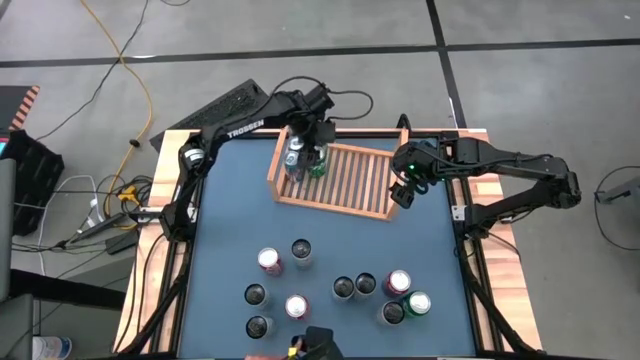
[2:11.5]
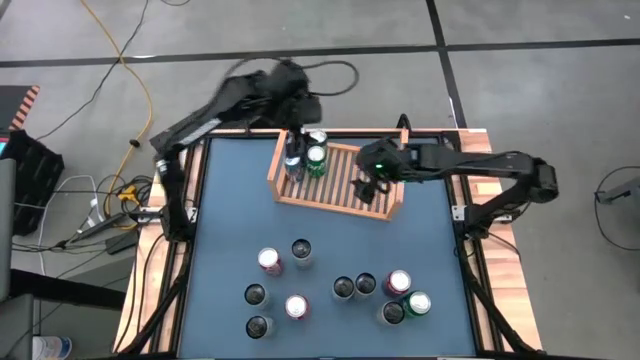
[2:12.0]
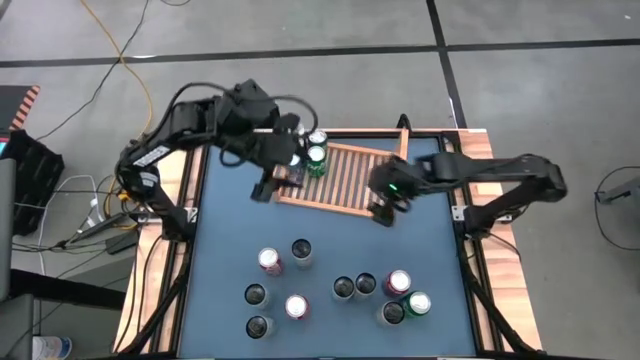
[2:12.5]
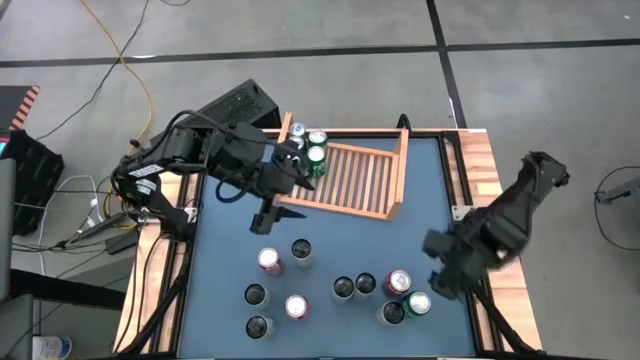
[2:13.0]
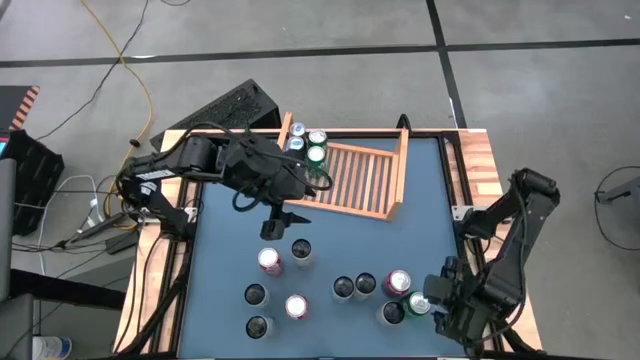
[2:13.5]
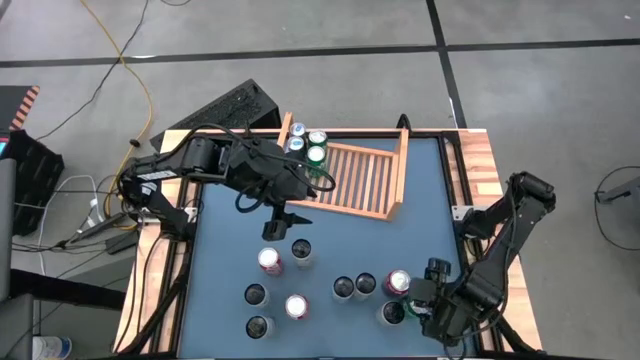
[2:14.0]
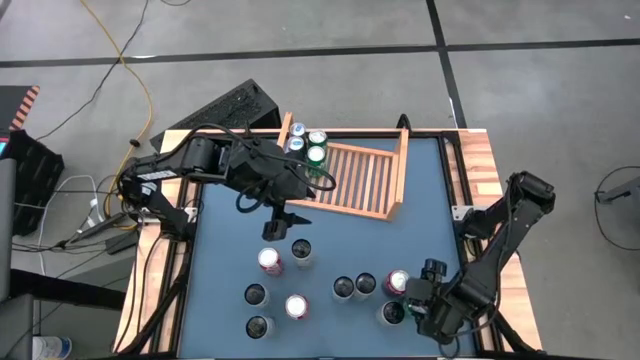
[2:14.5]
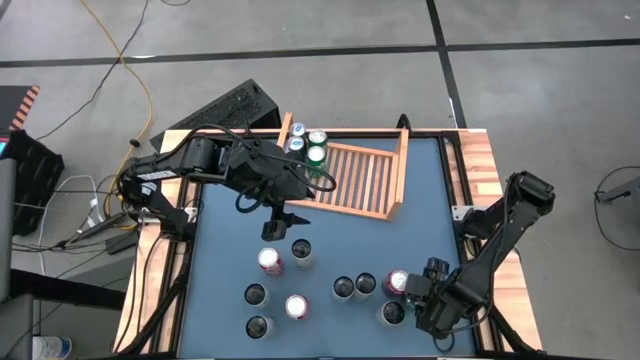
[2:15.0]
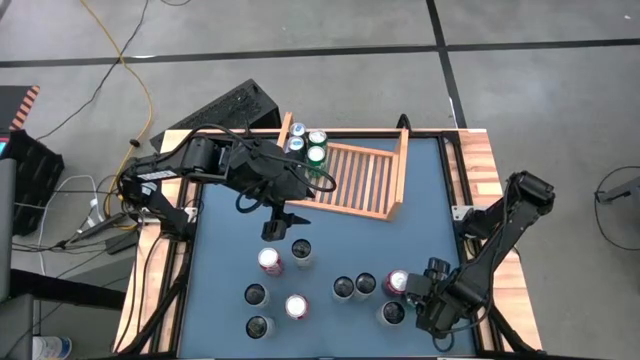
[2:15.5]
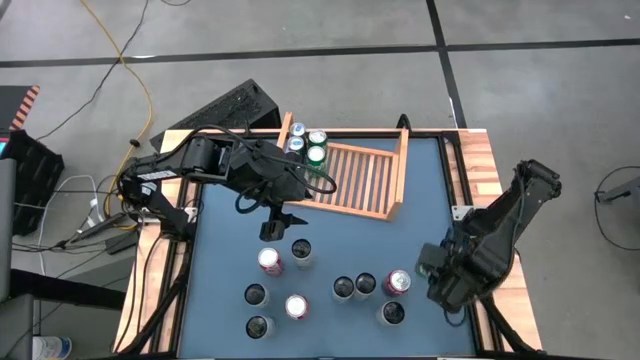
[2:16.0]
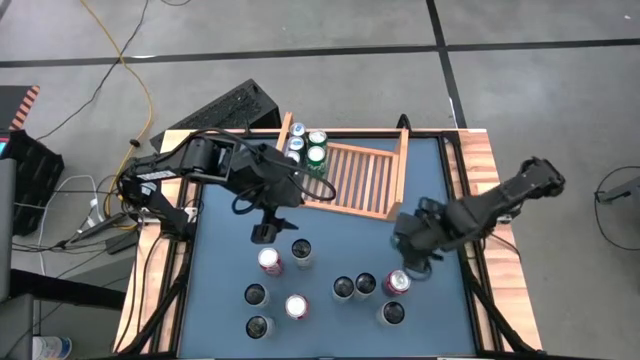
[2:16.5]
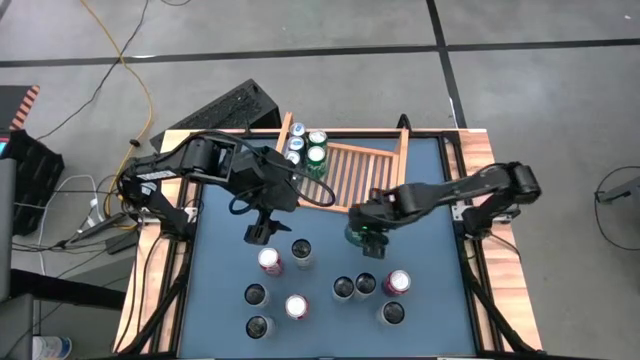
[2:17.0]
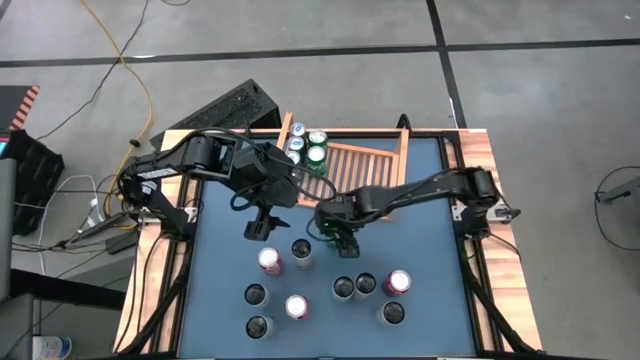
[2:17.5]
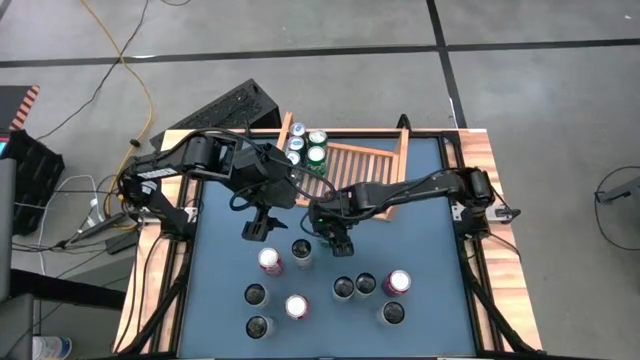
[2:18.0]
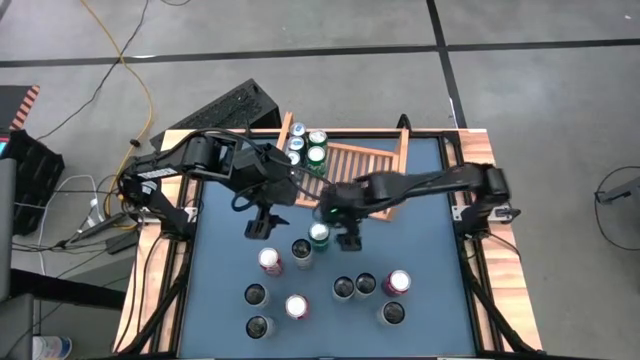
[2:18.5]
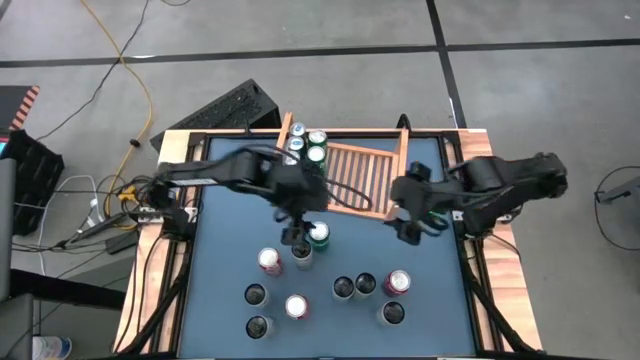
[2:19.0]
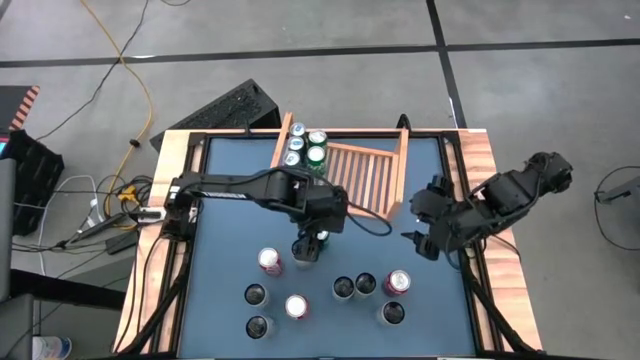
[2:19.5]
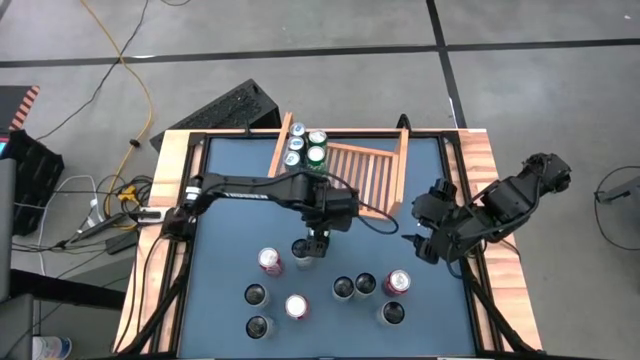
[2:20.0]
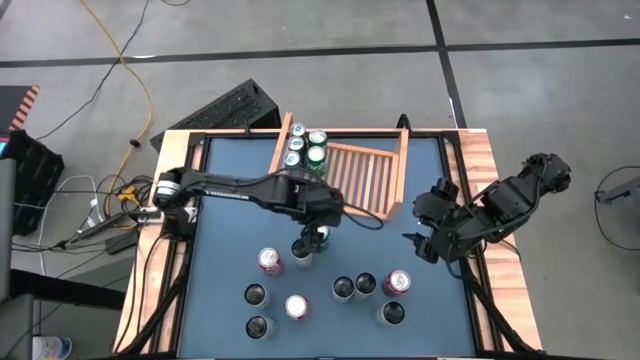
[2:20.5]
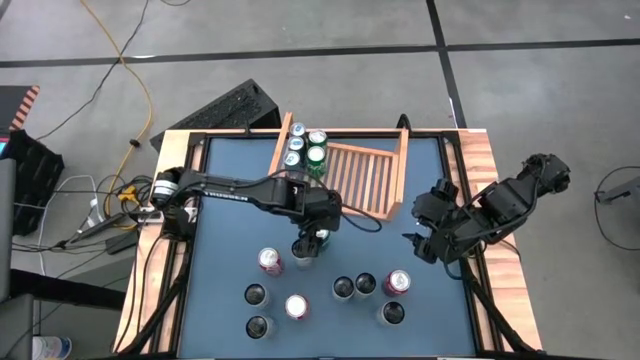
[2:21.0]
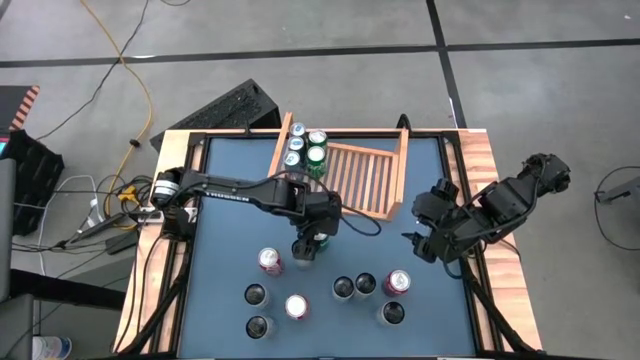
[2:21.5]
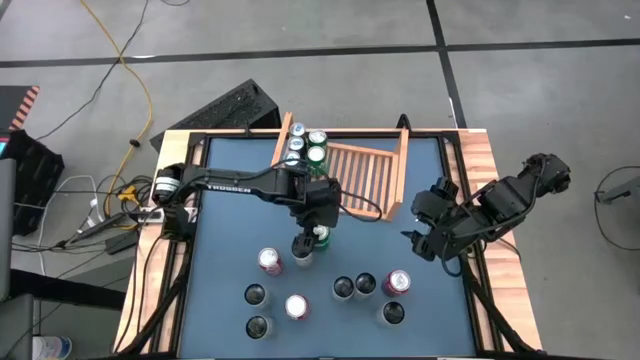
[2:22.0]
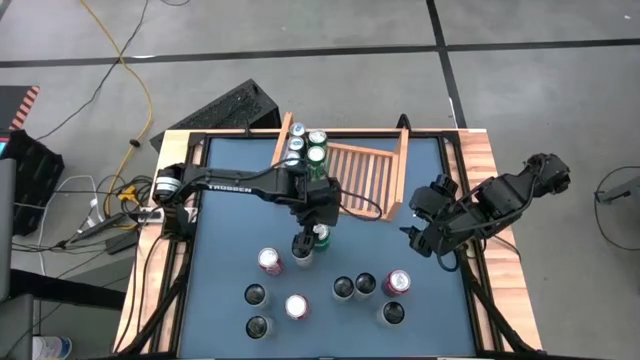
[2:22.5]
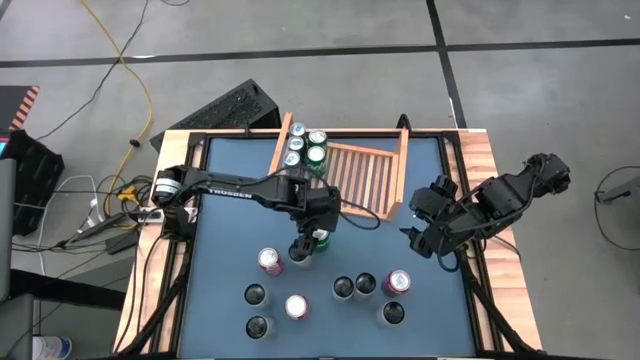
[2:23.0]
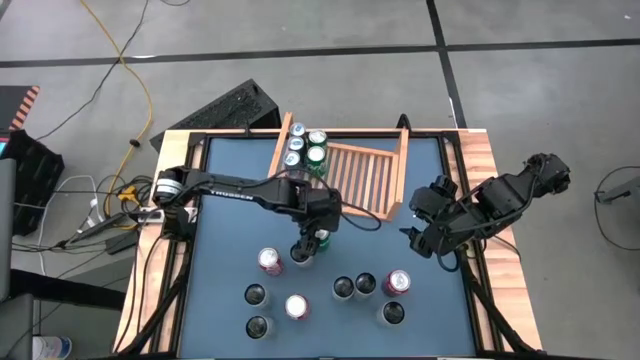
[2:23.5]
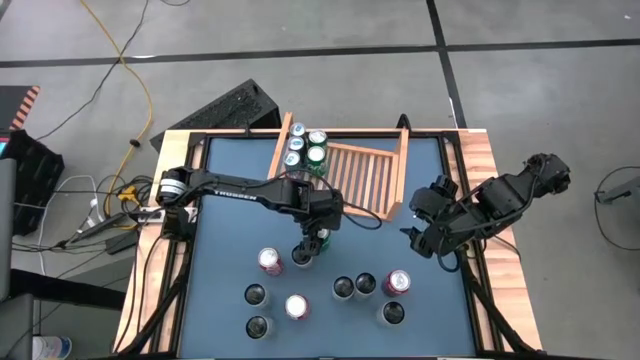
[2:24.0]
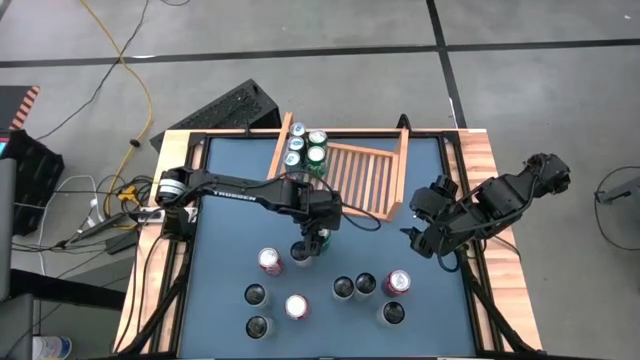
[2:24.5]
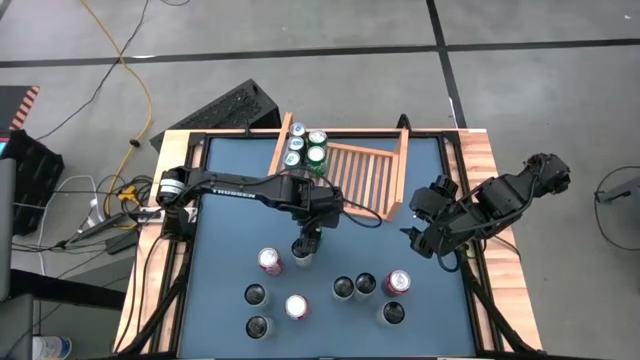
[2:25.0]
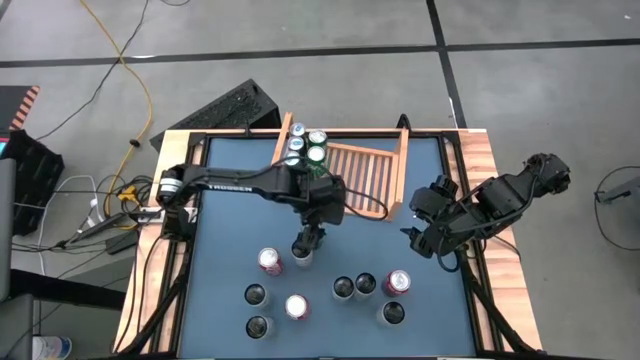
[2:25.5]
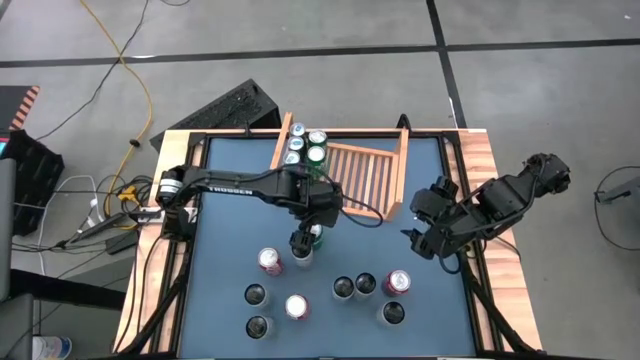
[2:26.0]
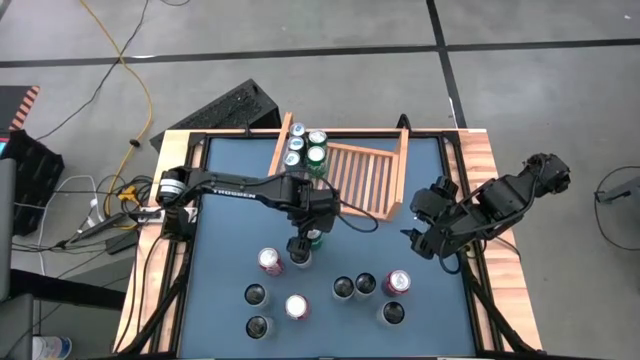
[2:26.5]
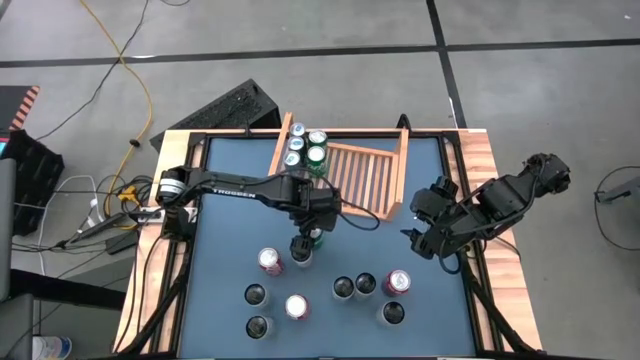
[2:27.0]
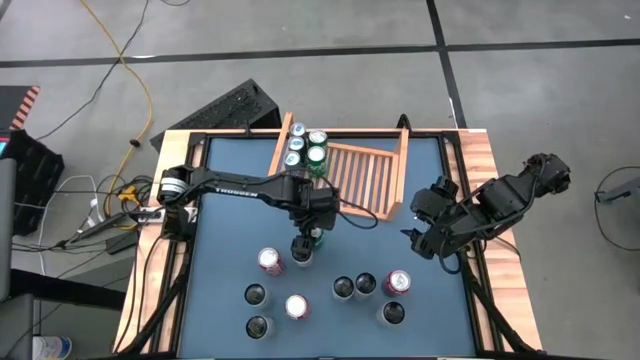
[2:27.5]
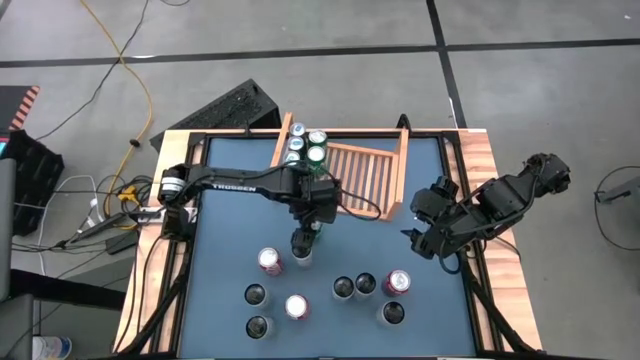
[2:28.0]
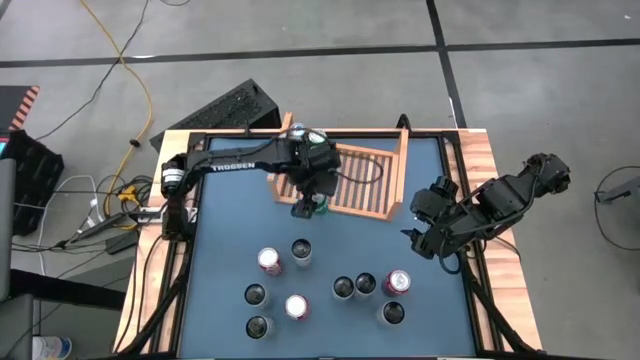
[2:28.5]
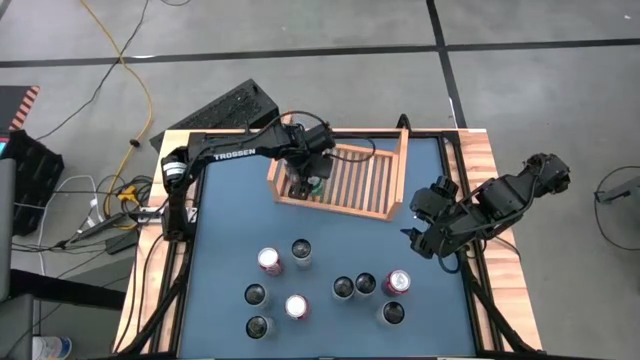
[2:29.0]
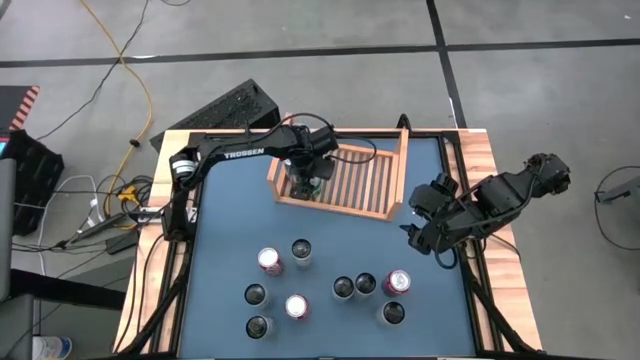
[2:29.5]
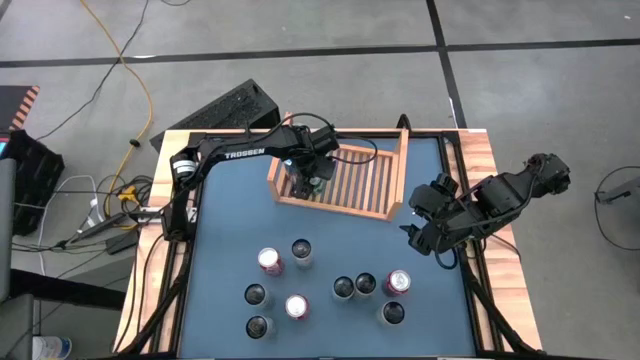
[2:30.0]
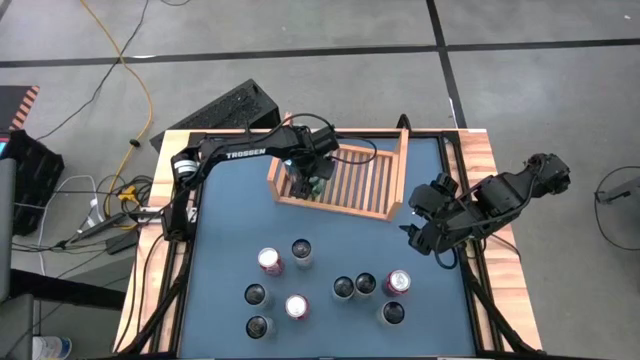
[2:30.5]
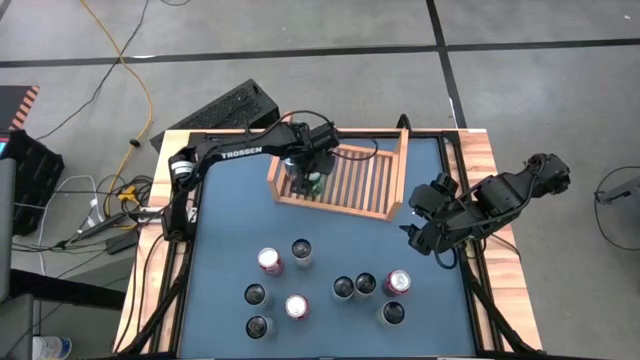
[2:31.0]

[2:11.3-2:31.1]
Task: Place canned beverage on shelf
Put the green soda can on the shelf

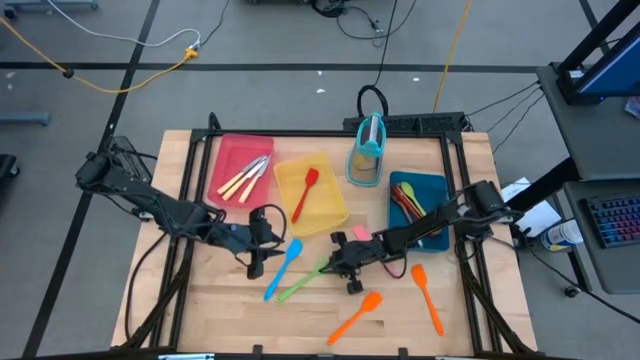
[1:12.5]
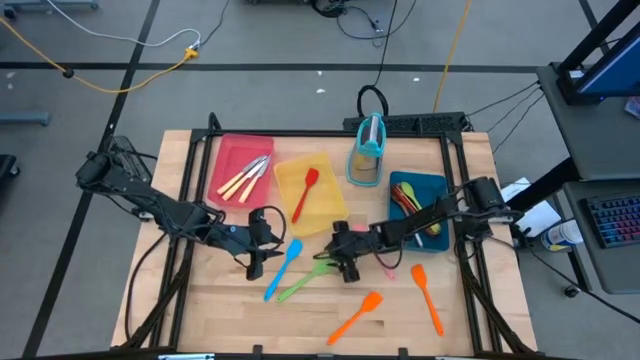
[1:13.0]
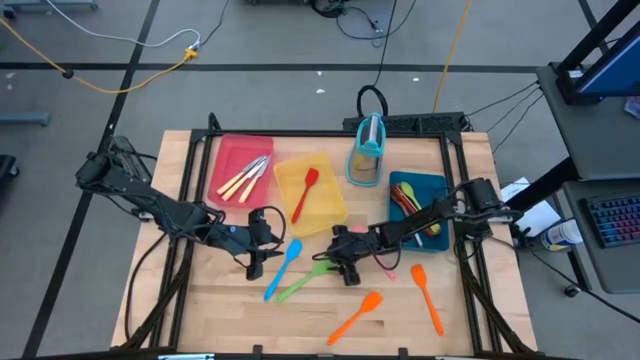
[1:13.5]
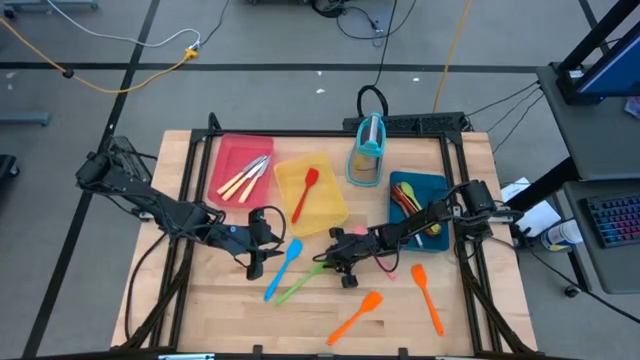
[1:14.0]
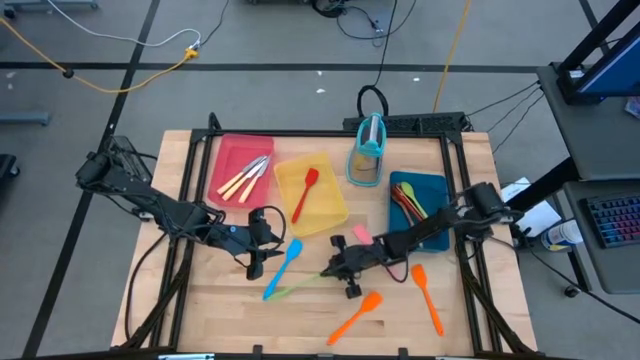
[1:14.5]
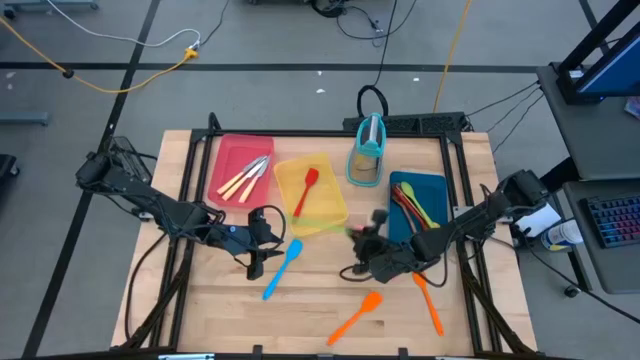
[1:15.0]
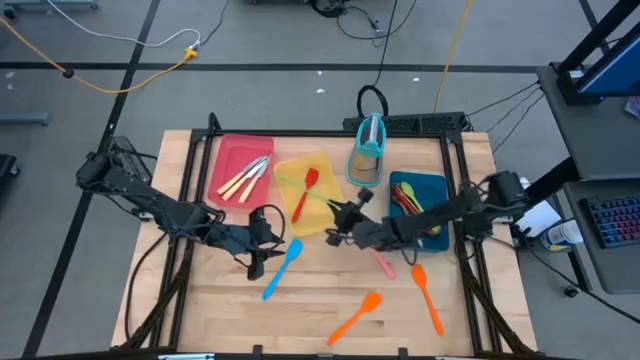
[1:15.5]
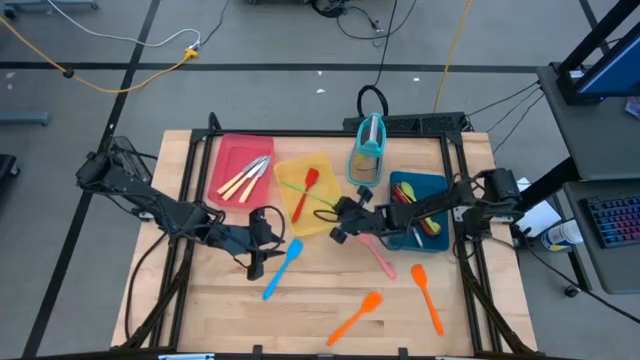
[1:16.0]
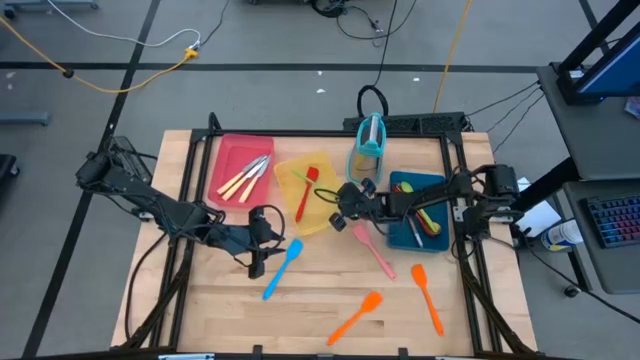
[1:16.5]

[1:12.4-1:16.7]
Task: Pick & Place Kitchen Items
Put the green spatula into the yellow bin
